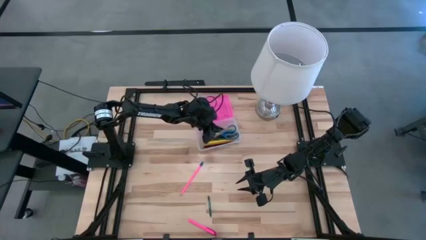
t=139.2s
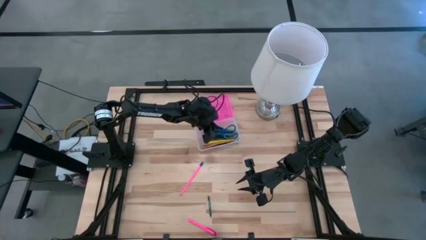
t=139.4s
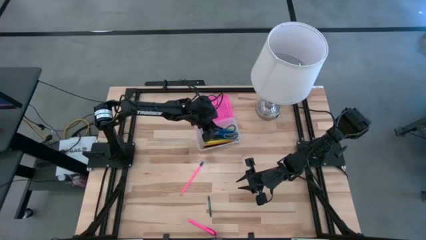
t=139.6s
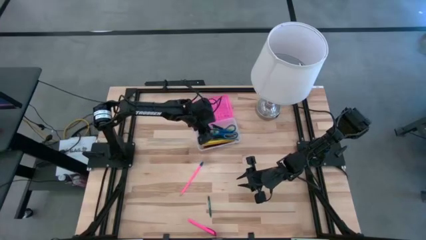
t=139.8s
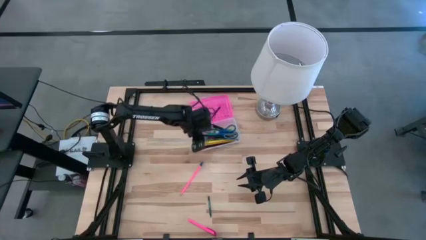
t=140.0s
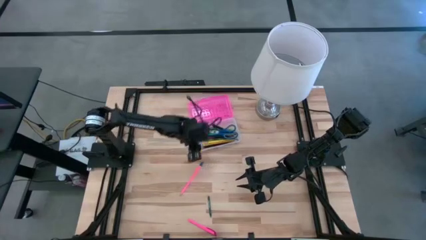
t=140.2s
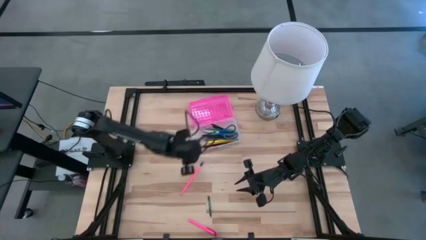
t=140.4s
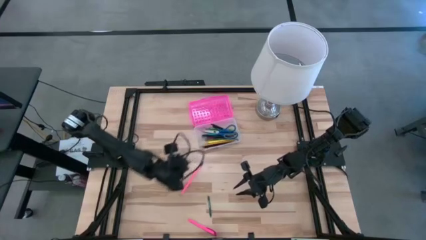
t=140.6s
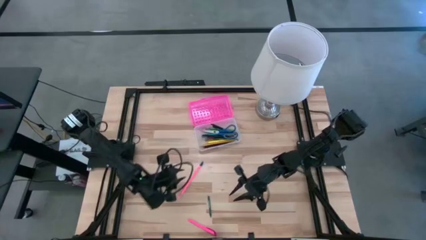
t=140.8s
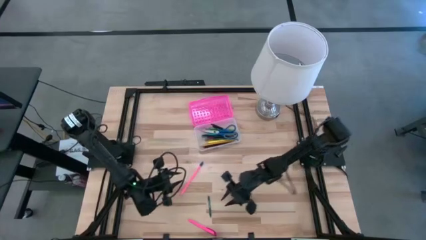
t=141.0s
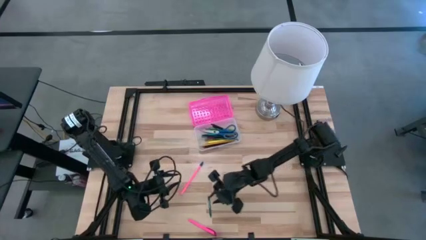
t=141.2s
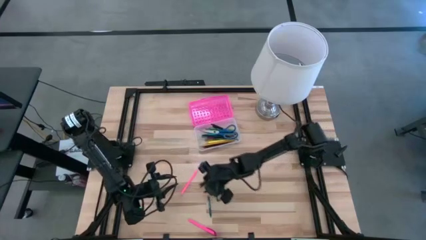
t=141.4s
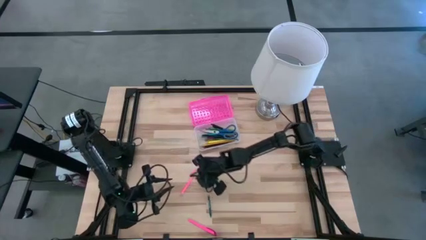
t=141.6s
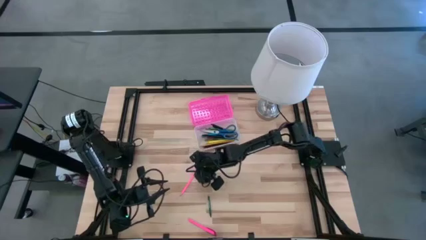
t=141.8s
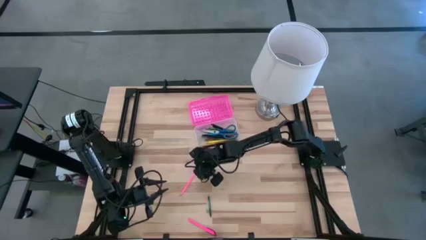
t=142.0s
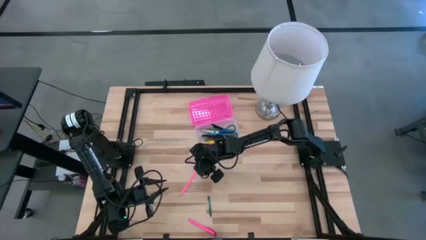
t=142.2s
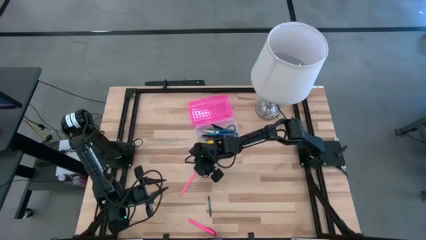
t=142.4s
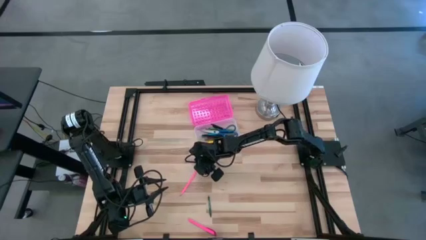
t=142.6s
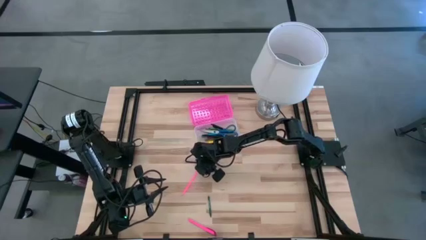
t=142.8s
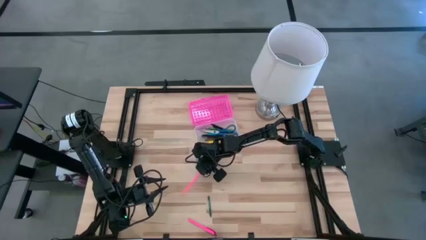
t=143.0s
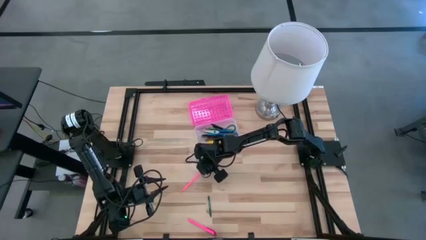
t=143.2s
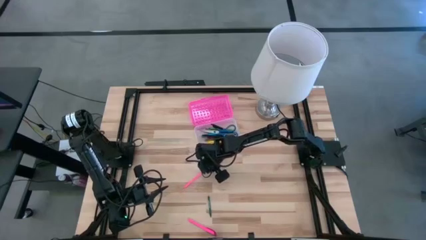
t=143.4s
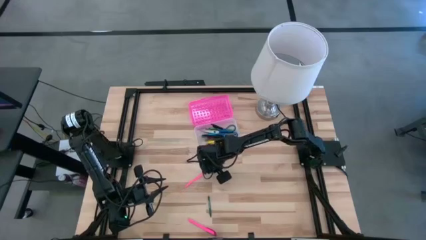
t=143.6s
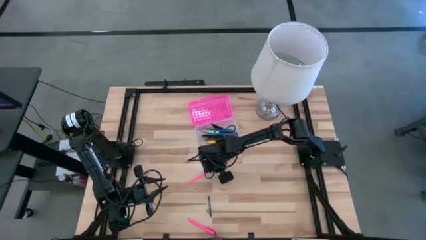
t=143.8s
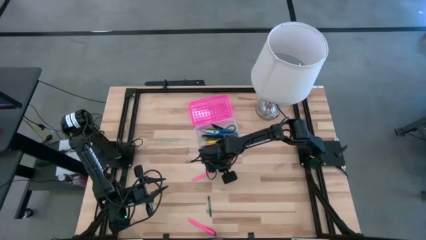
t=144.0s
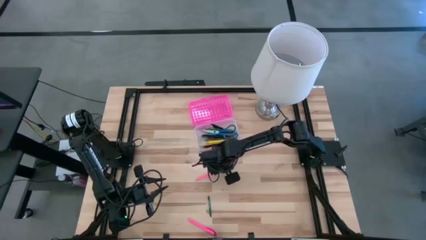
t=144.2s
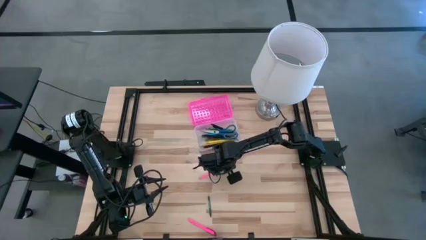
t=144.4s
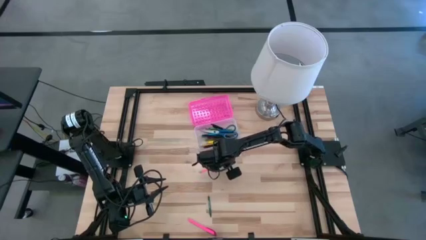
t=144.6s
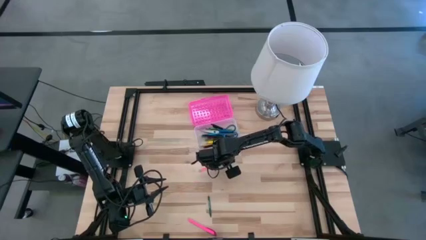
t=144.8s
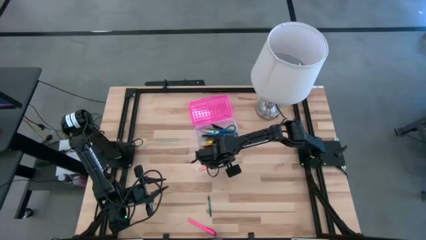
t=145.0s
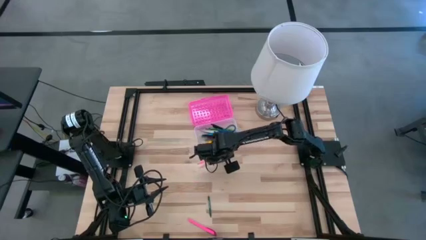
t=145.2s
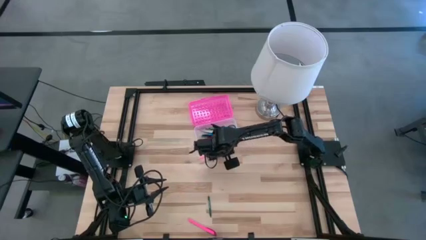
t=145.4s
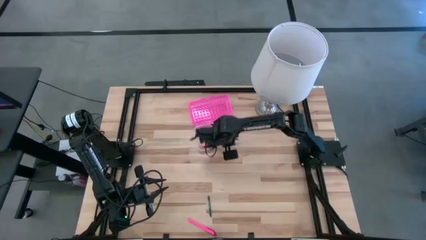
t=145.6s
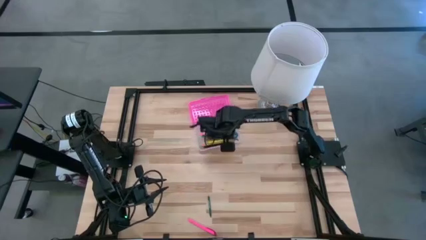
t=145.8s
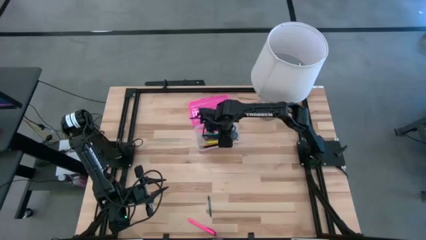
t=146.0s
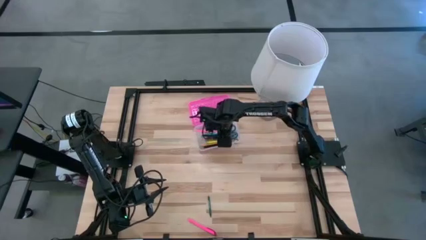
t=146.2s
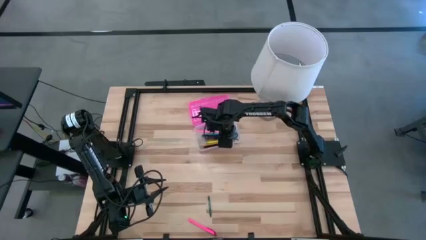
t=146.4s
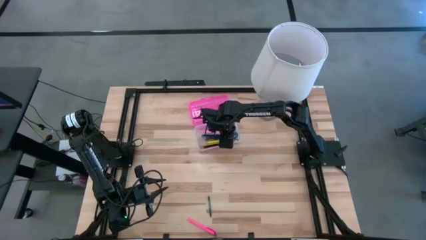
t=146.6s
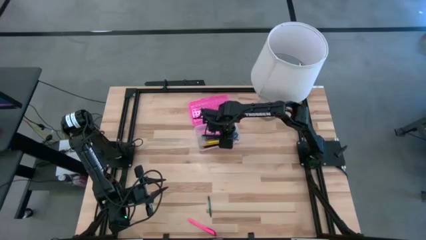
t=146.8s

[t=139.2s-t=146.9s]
Task: Pick & place school supplies into a supply box
Put the pink pencil into the pink supply box

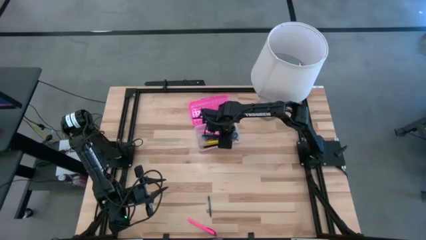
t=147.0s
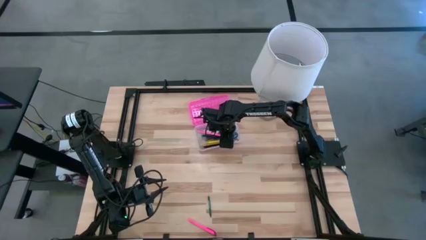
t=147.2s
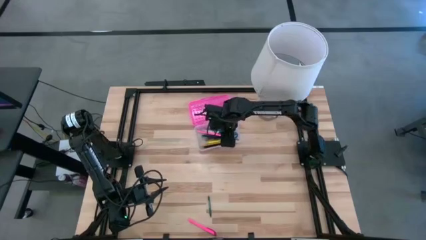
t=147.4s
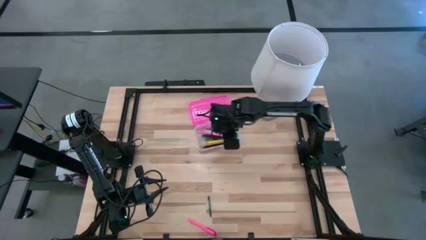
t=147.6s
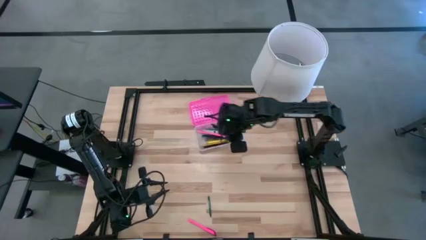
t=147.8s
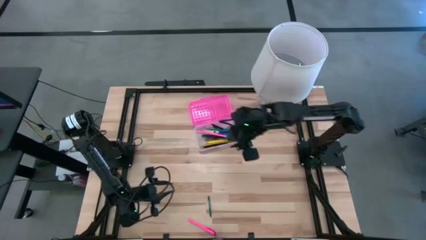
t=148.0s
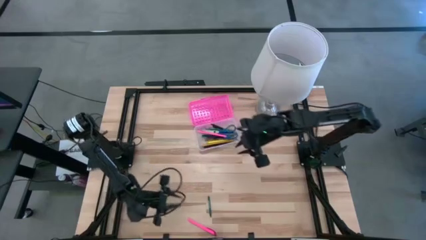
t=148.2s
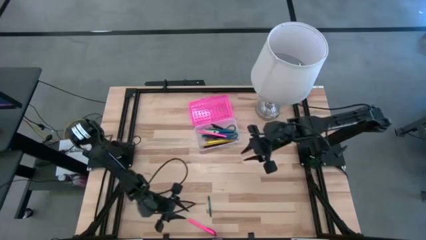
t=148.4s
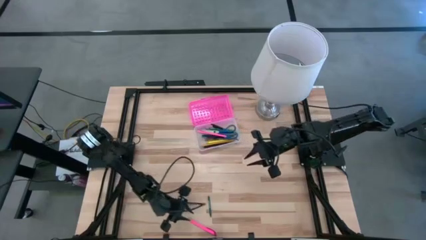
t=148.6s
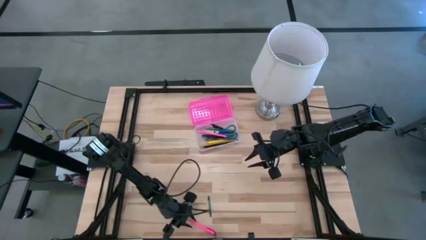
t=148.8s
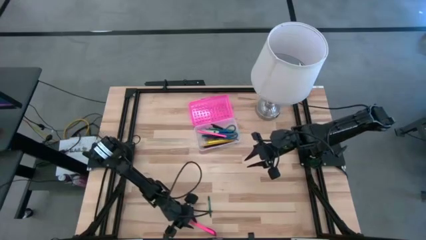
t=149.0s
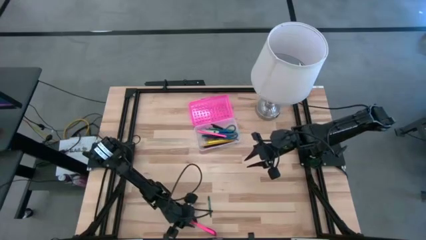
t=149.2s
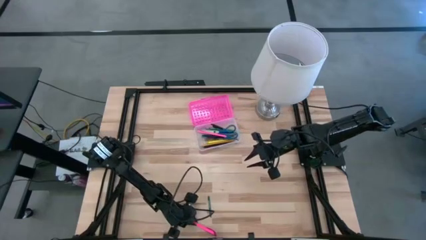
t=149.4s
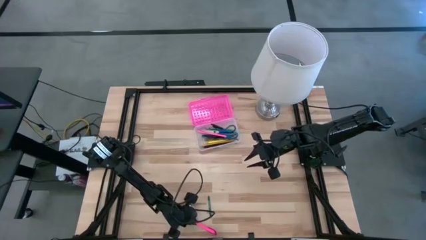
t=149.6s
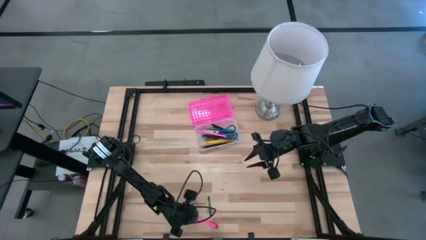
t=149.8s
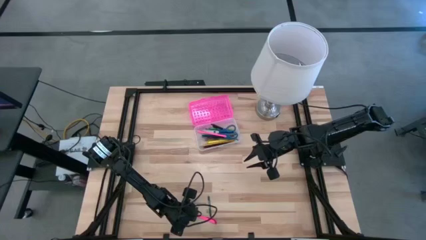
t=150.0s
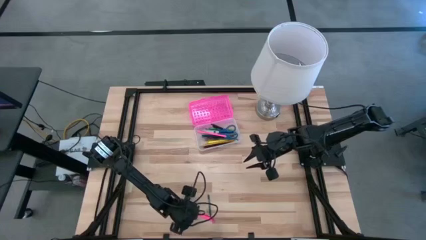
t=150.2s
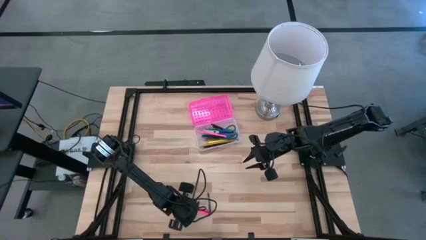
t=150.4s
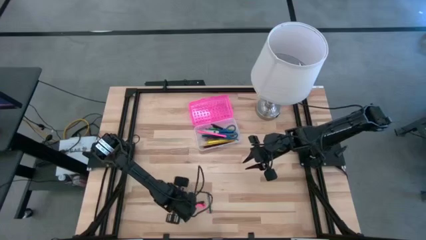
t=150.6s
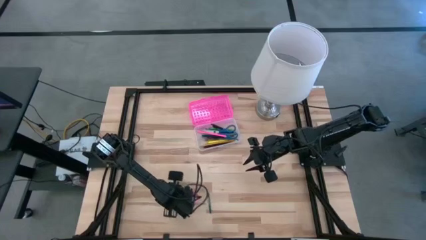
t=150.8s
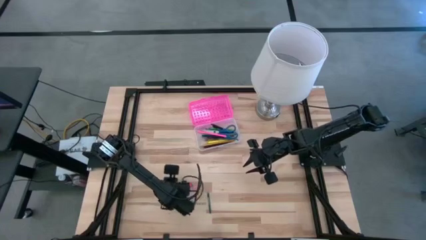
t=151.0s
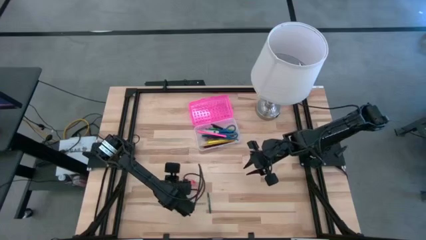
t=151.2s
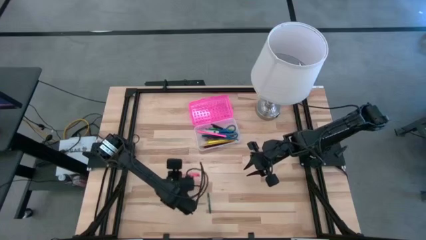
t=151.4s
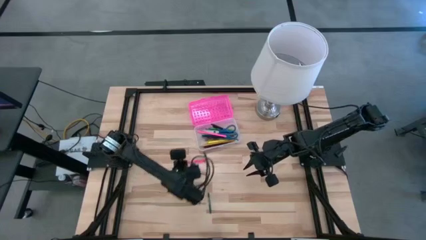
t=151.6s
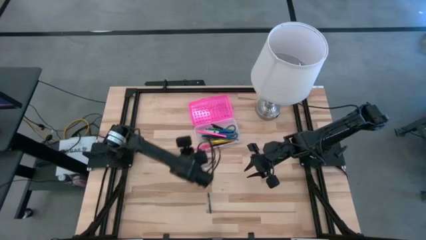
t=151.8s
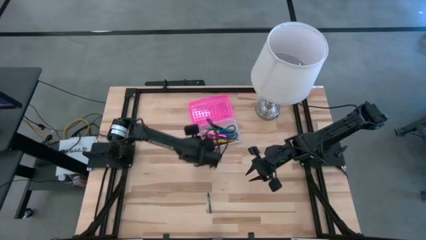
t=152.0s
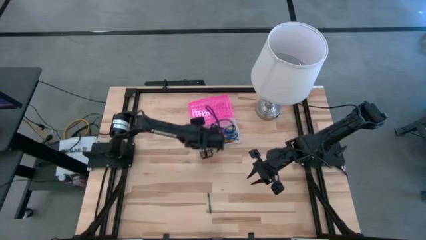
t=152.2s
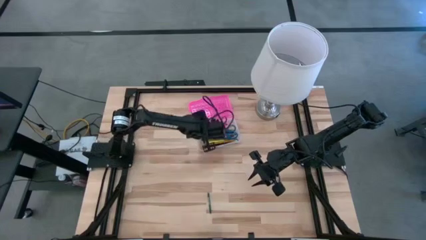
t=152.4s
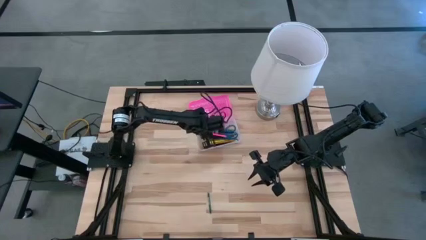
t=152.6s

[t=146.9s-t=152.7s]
Put the pink pen into the pink supply box
